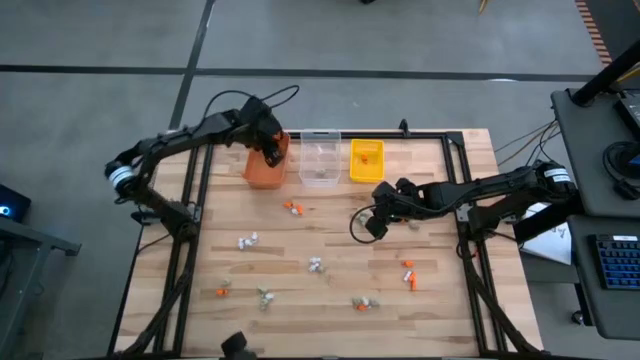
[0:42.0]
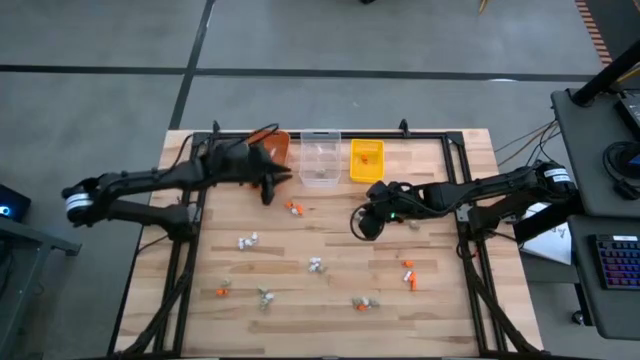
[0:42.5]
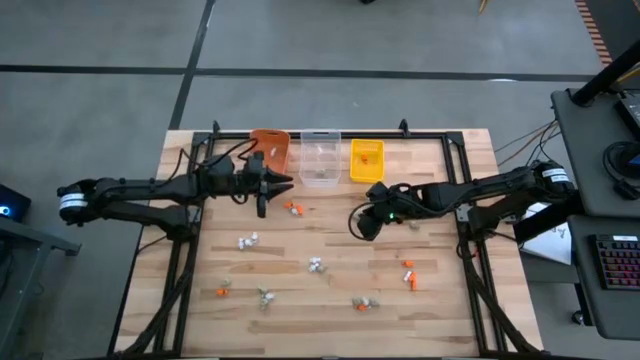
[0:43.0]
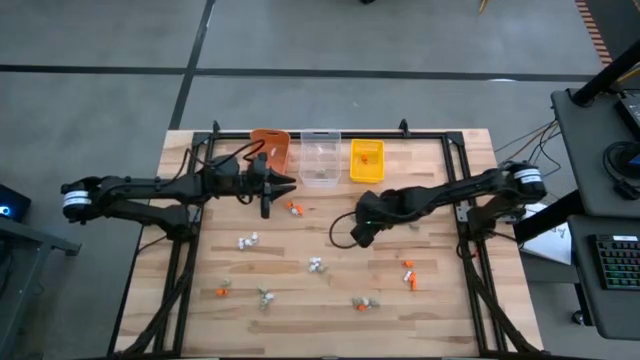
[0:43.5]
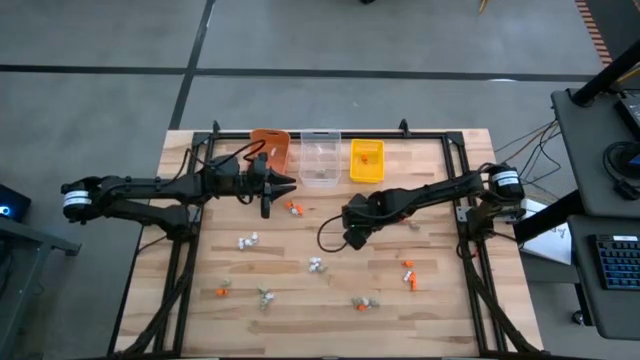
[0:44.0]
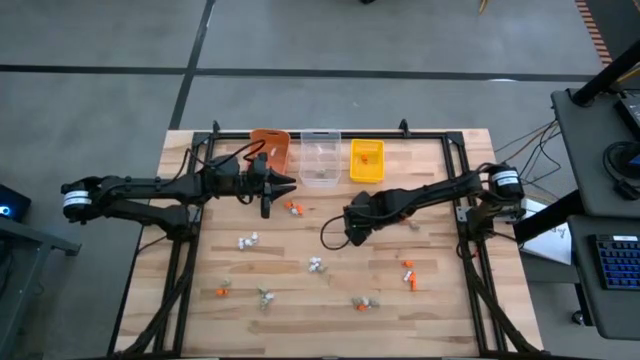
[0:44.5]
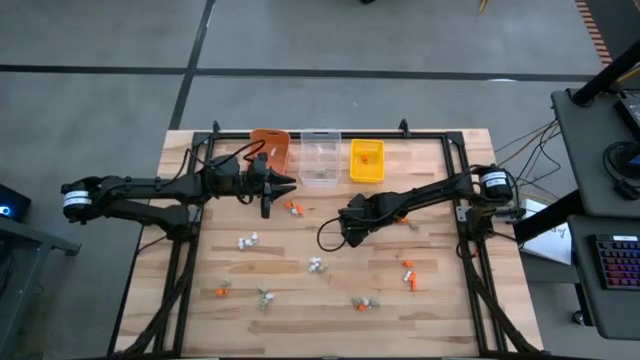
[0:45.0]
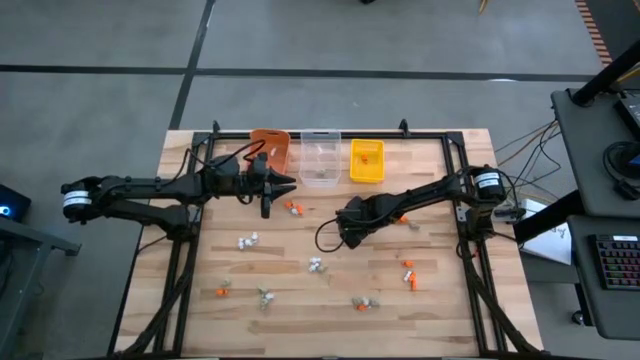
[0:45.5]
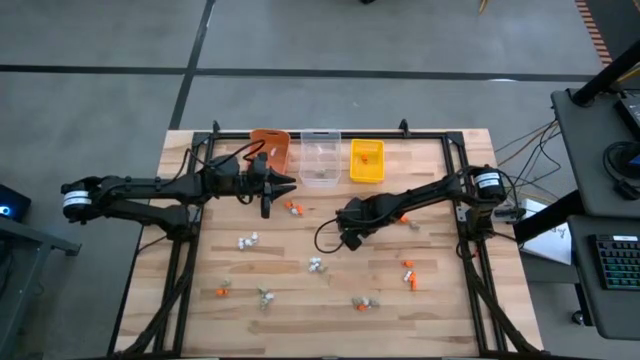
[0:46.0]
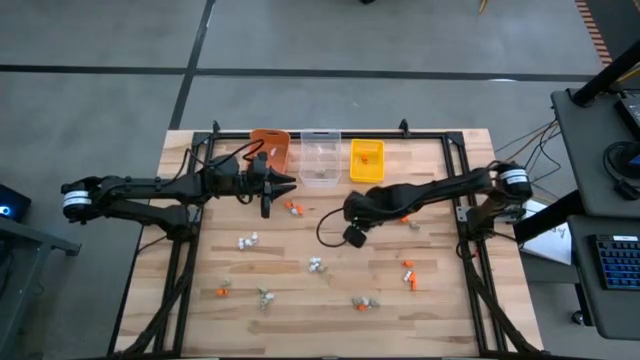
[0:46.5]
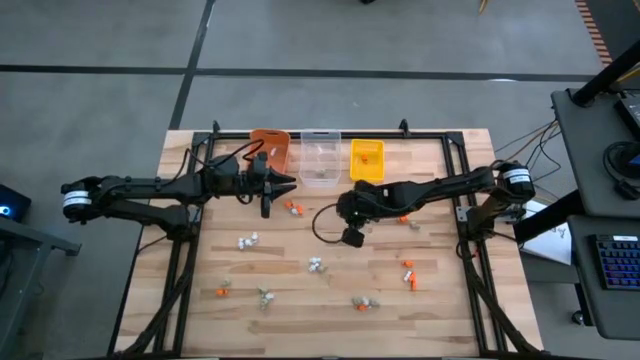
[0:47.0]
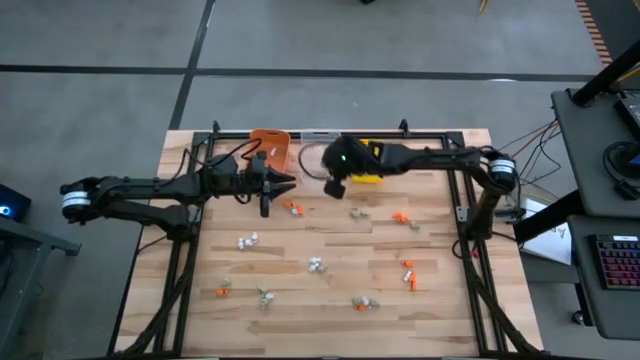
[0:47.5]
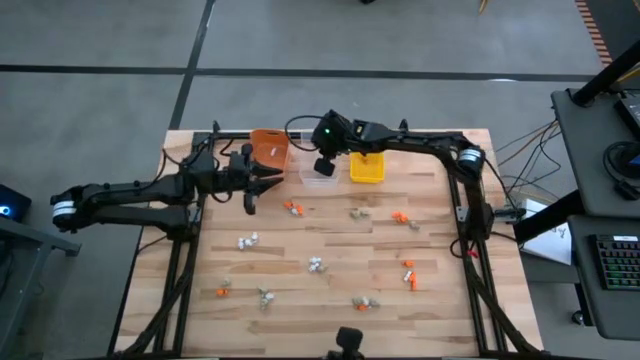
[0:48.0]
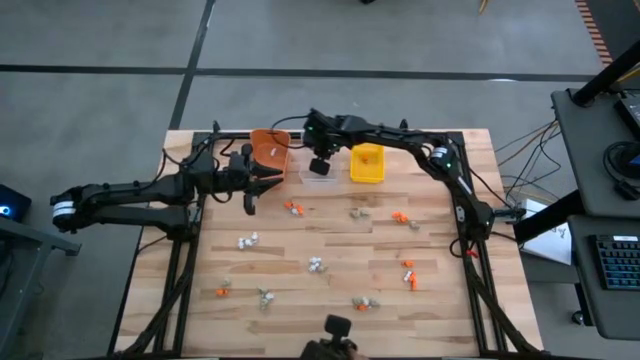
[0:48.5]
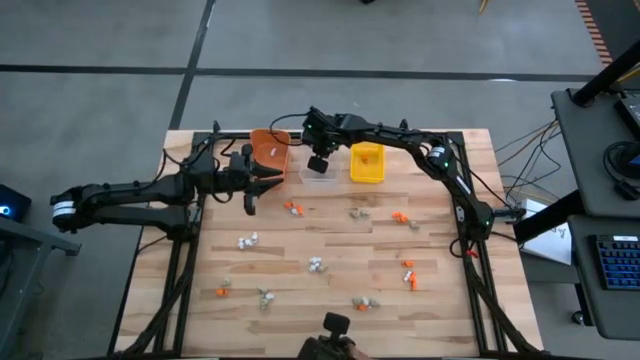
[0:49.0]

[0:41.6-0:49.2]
Task: Sort Halloween decoration
Put the gray skull toy into the transparent bin

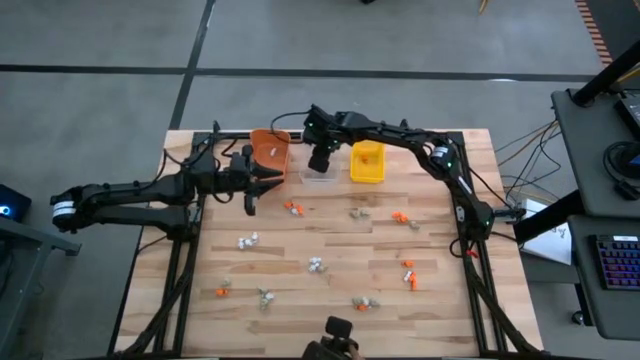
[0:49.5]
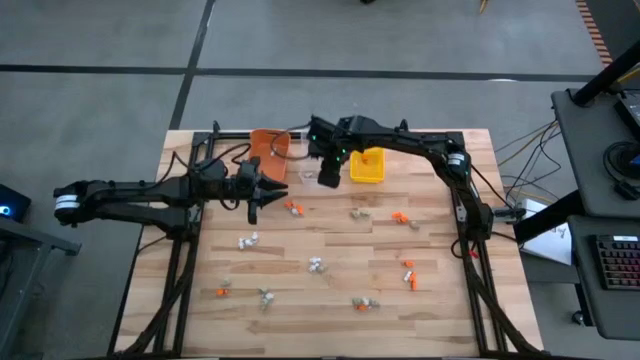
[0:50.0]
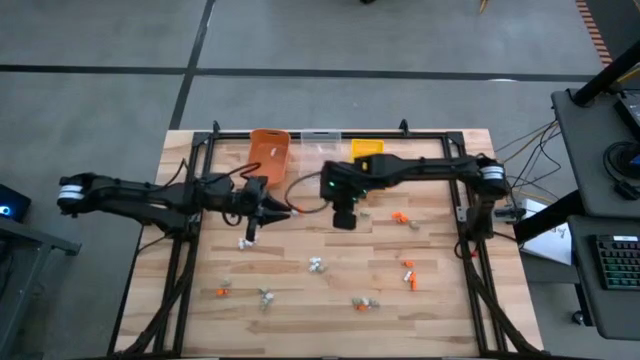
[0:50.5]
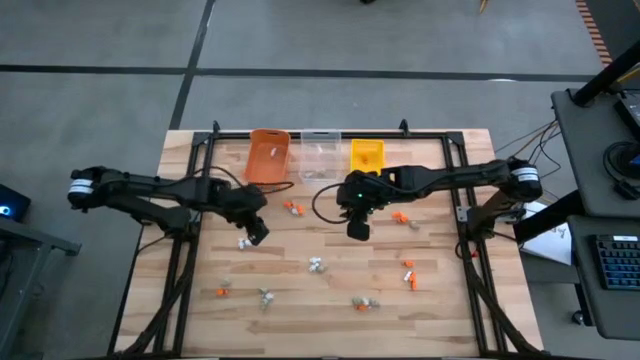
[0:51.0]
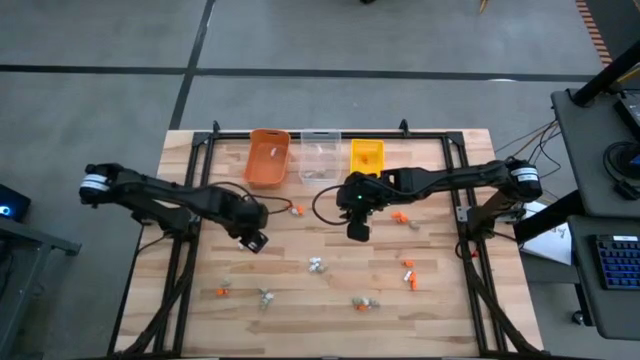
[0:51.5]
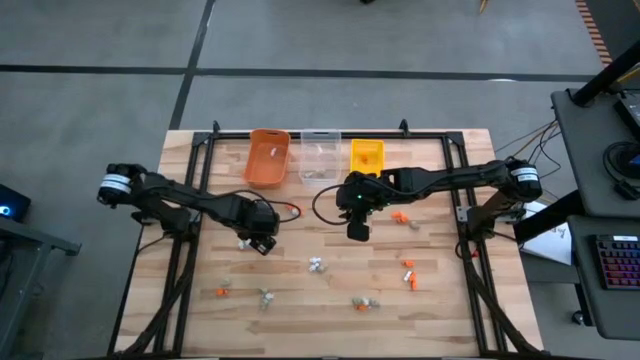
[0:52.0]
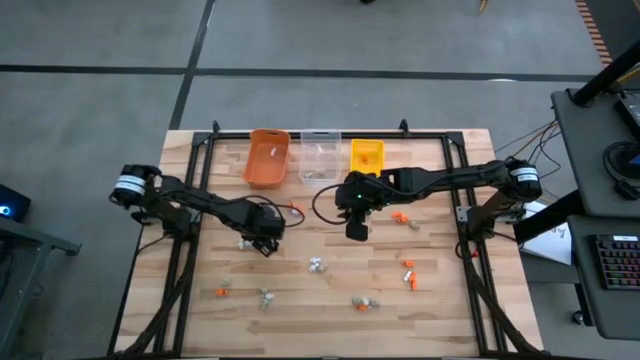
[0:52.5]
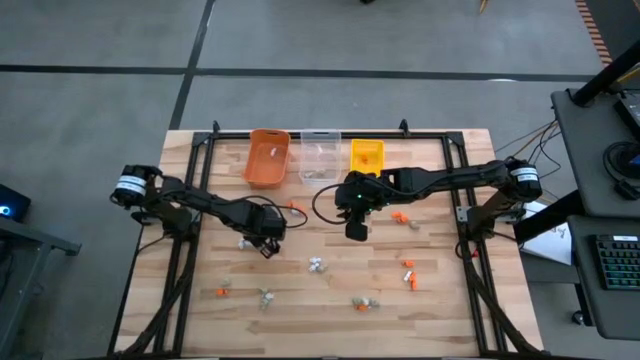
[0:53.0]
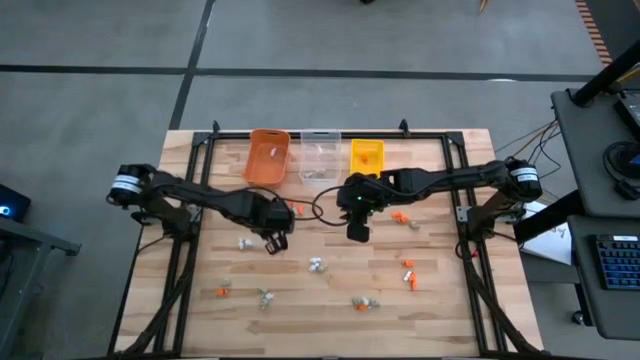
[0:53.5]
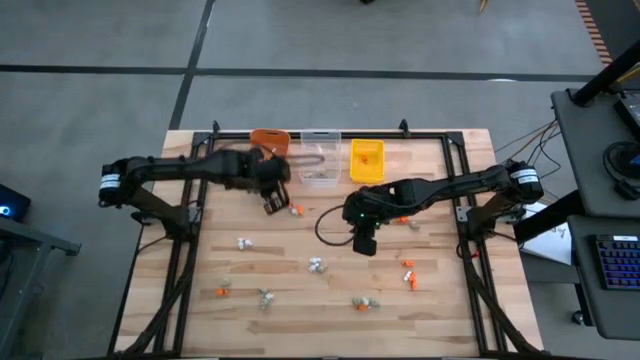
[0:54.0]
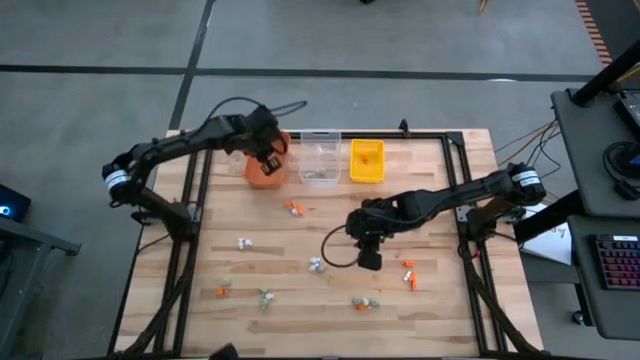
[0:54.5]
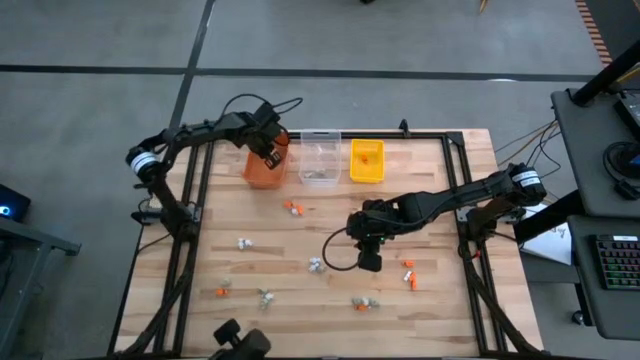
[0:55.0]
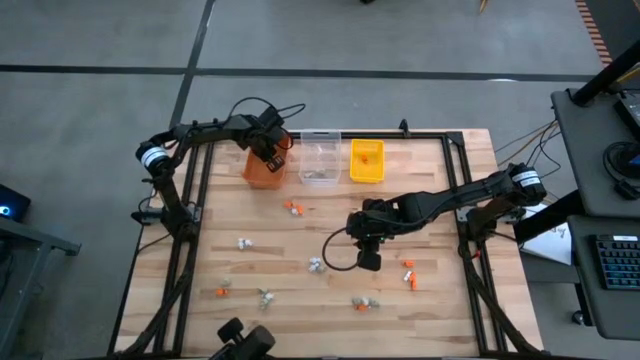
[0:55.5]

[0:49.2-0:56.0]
Put the white skeleton toy into the orange bin

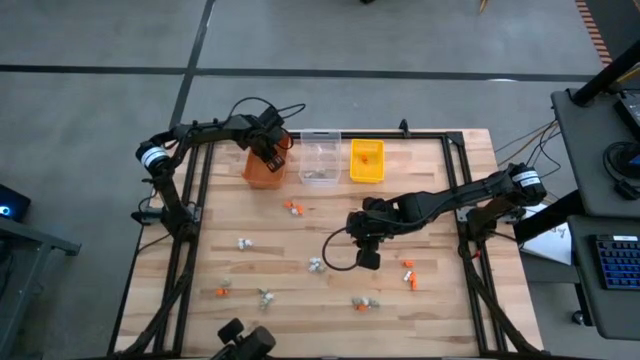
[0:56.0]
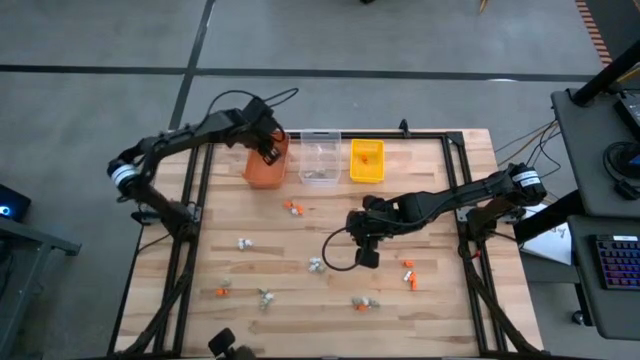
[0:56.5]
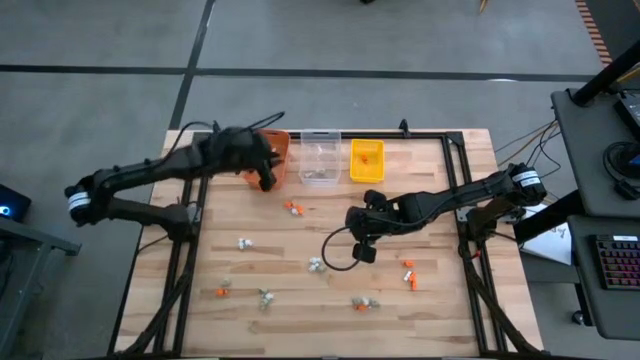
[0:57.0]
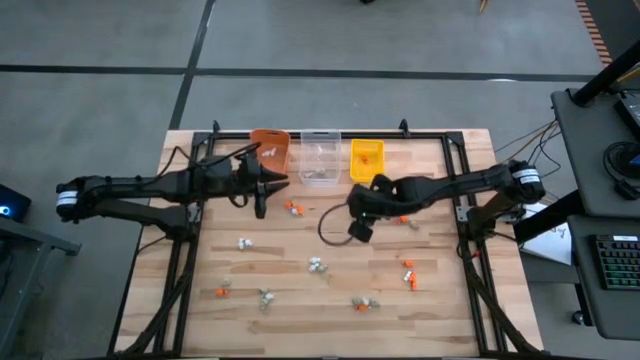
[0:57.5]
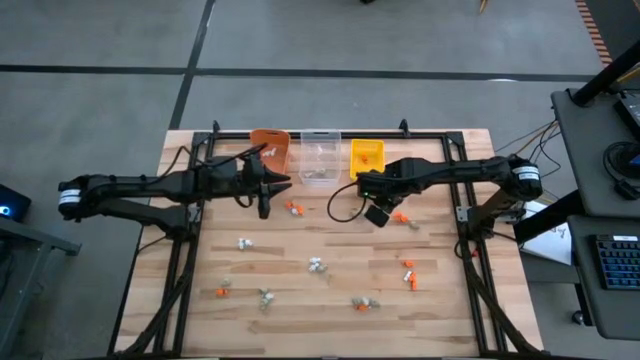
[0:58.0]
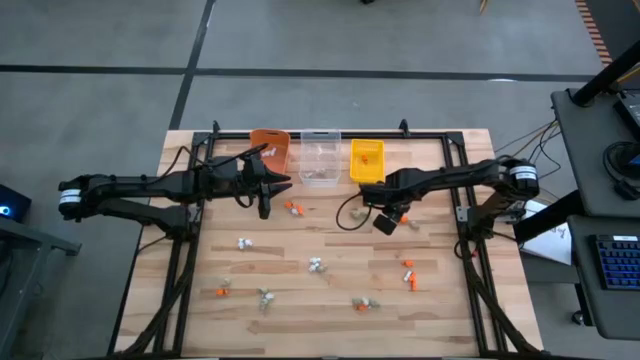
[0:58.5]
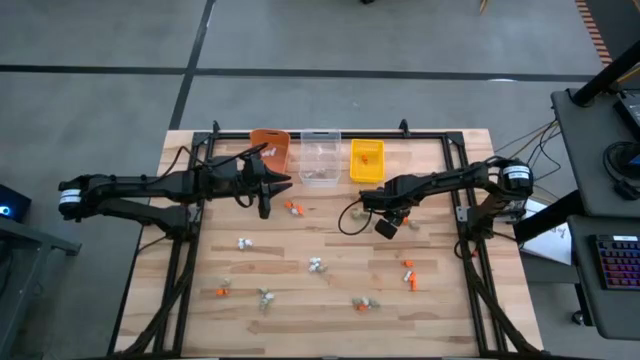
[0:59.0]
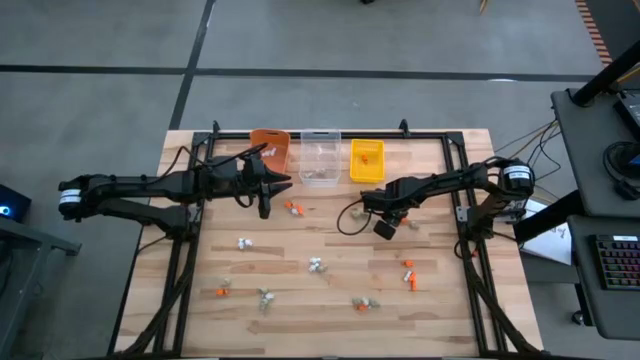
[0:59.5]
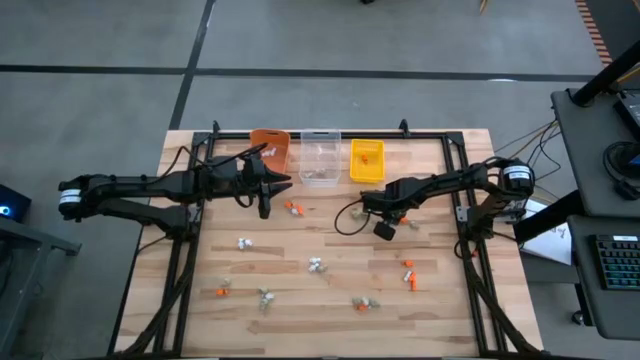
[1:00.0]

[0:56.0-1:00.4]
Put the orange skeleton toy into the yellow bin

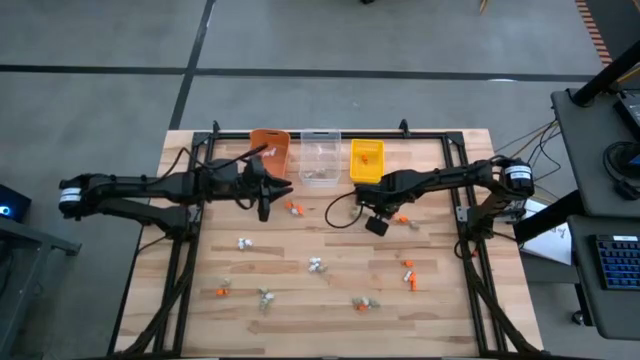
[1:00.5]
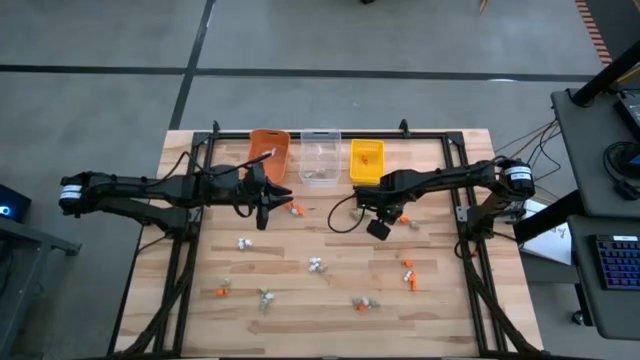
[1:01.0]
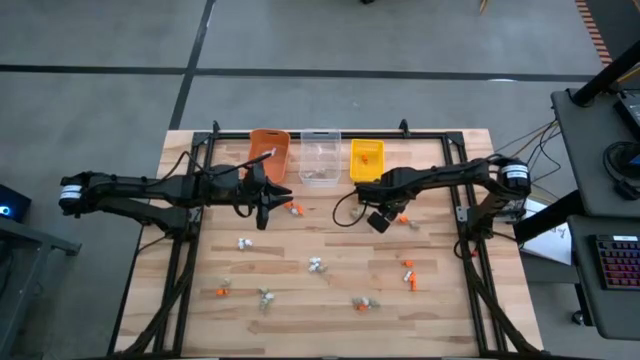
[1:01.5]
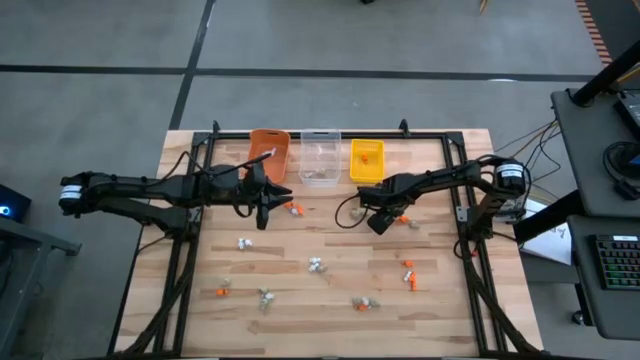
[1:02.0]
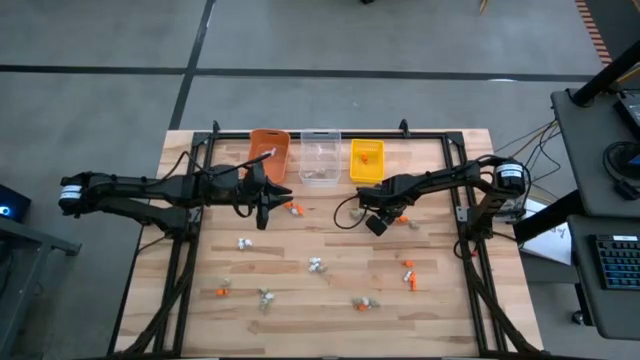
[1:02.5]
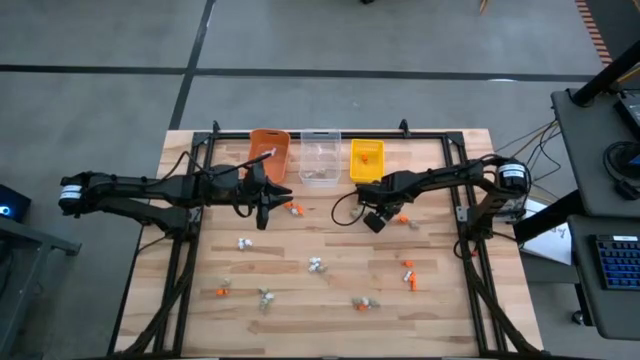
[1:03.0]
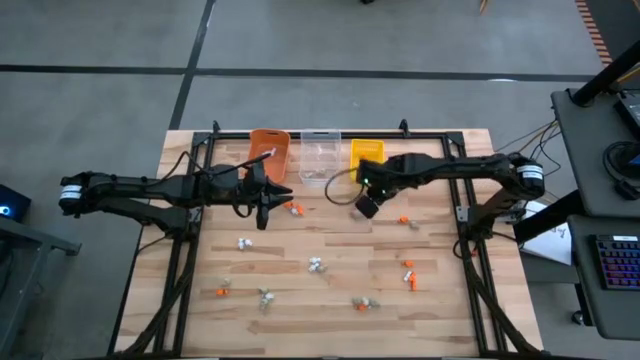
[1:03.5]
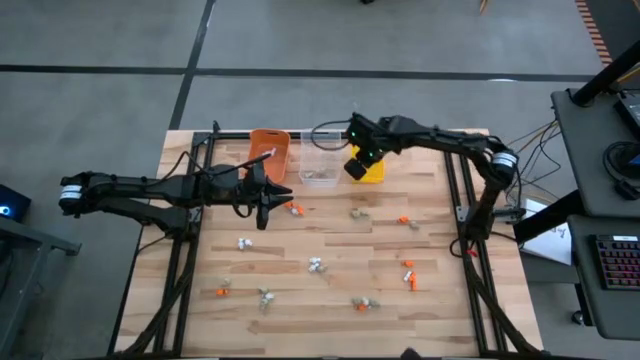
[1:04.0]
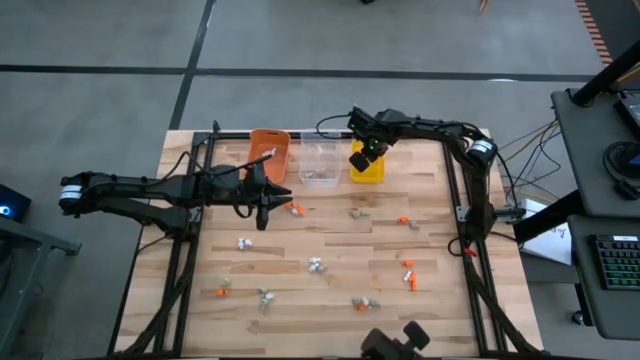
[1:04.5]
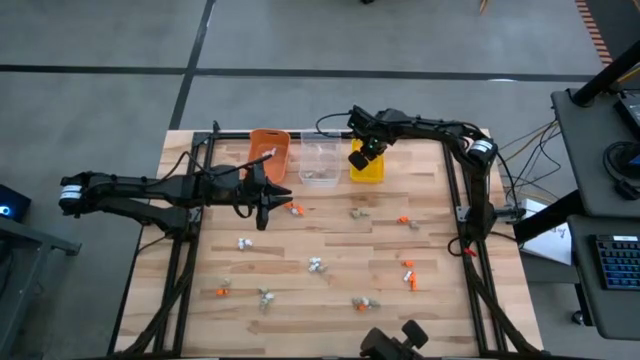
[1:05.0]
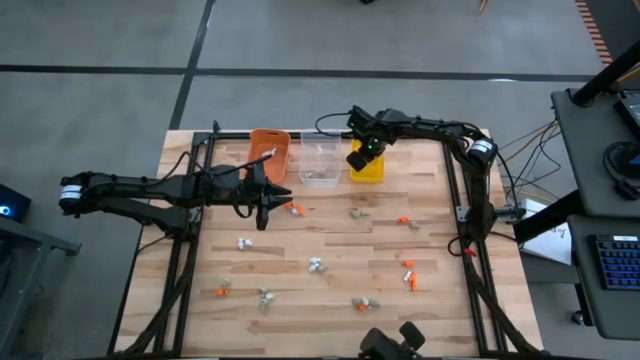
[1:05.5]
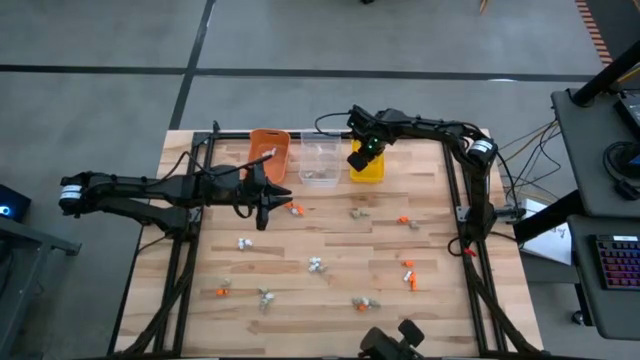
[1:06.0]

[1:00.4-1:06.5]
Put the orange skeleton toy into the yellow bin
